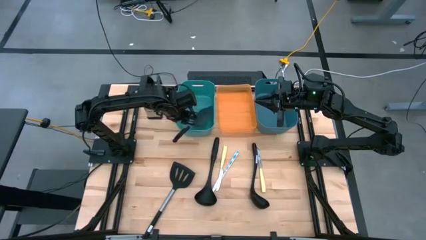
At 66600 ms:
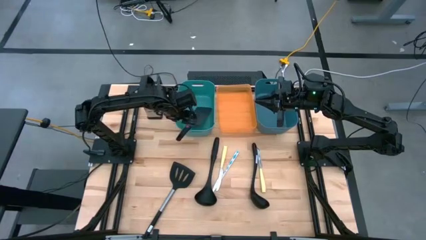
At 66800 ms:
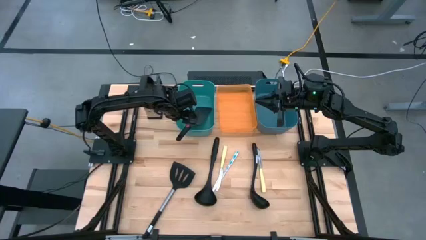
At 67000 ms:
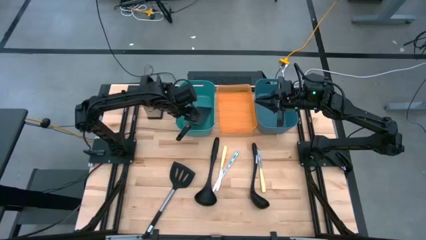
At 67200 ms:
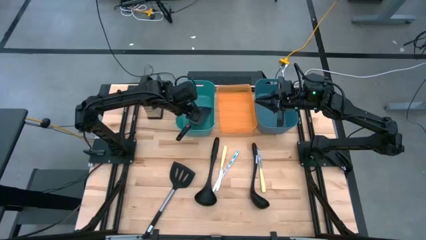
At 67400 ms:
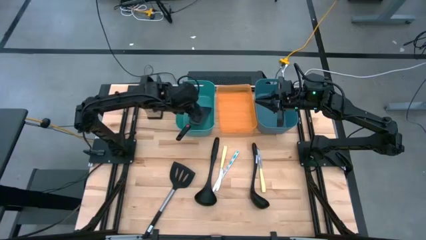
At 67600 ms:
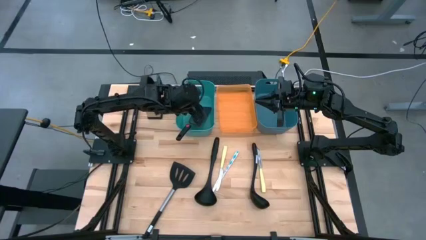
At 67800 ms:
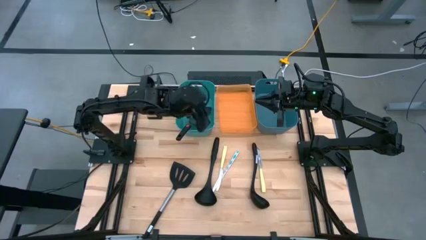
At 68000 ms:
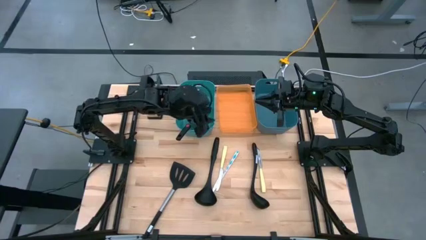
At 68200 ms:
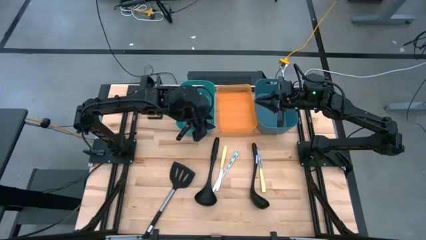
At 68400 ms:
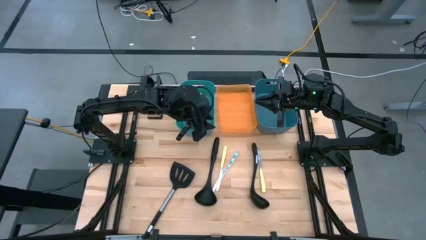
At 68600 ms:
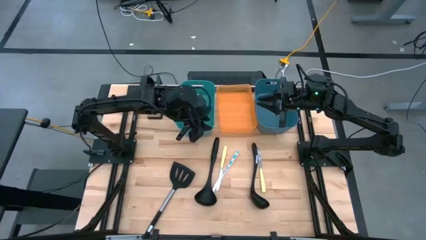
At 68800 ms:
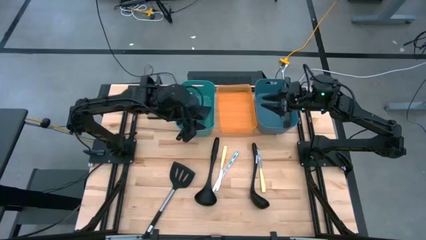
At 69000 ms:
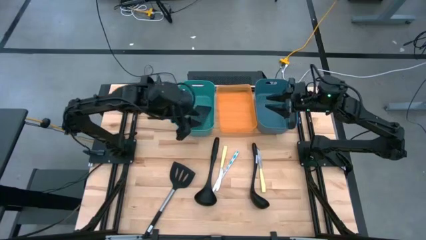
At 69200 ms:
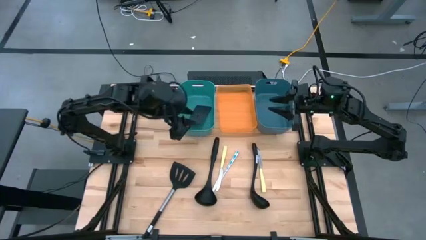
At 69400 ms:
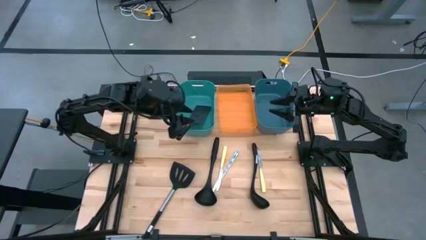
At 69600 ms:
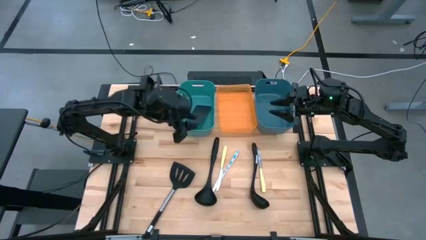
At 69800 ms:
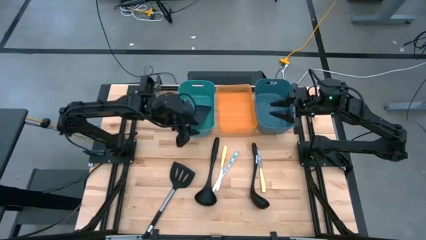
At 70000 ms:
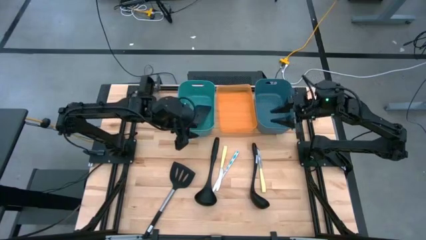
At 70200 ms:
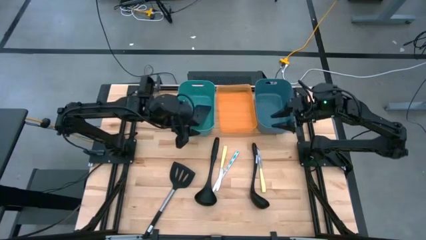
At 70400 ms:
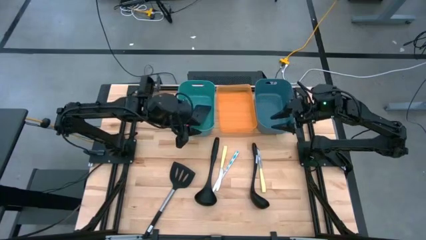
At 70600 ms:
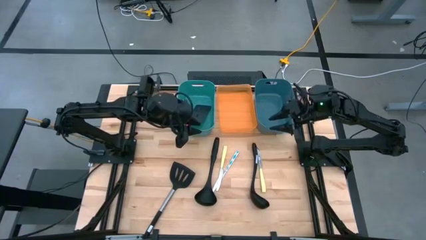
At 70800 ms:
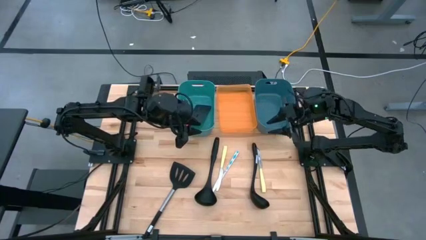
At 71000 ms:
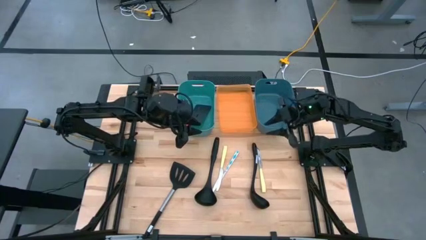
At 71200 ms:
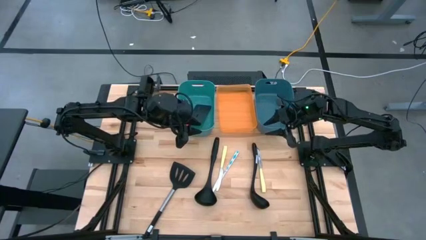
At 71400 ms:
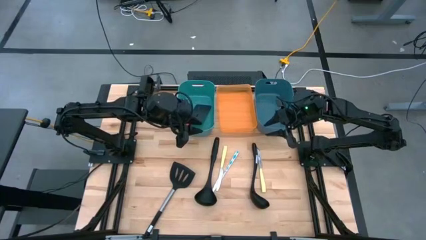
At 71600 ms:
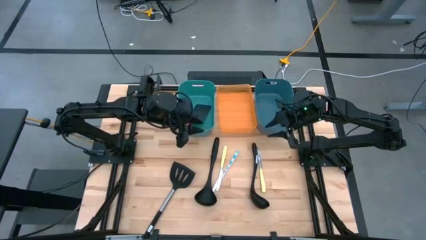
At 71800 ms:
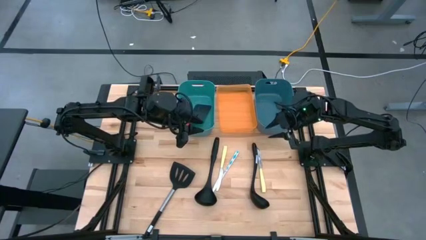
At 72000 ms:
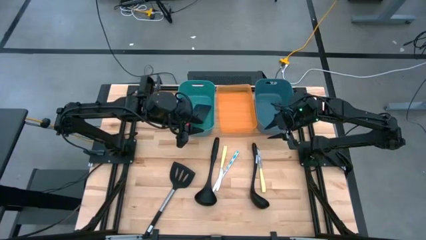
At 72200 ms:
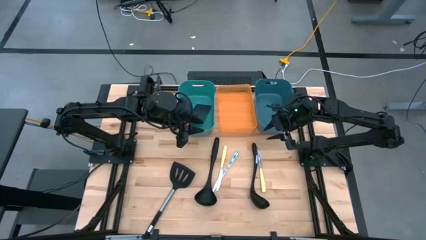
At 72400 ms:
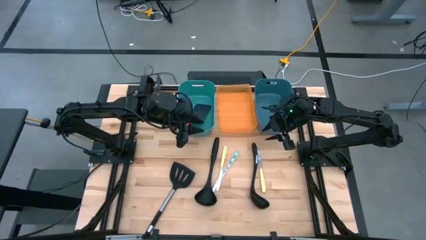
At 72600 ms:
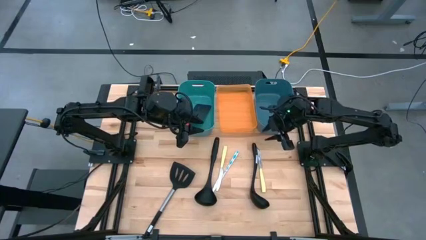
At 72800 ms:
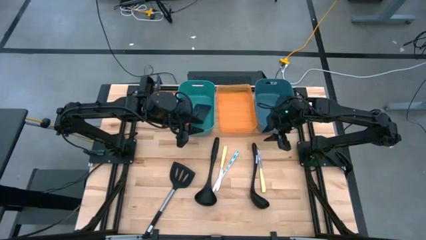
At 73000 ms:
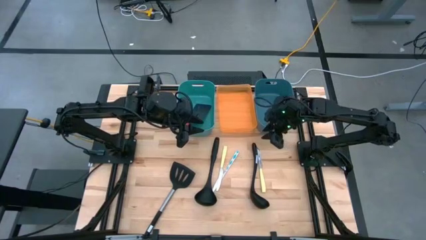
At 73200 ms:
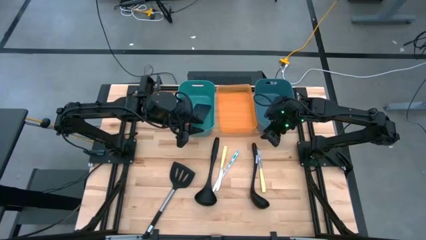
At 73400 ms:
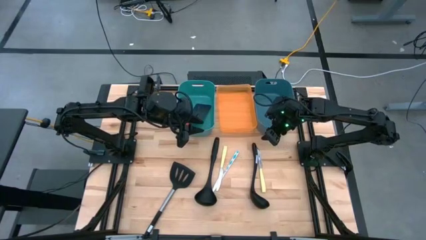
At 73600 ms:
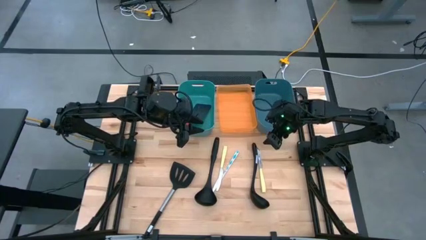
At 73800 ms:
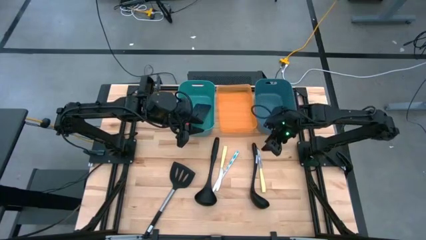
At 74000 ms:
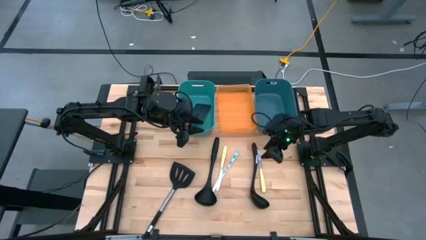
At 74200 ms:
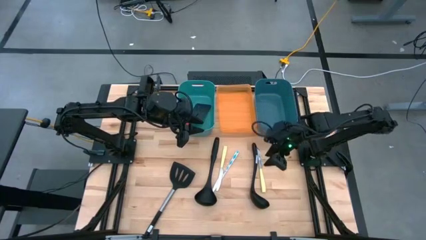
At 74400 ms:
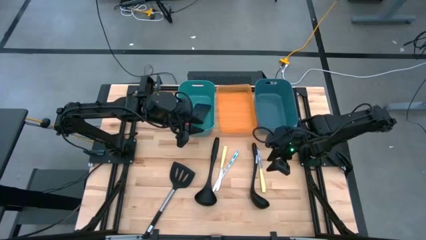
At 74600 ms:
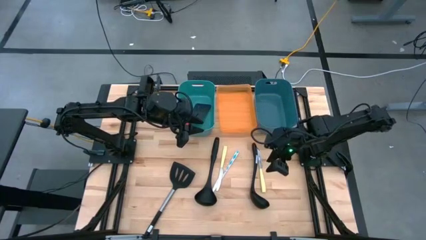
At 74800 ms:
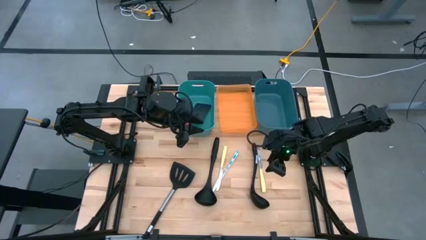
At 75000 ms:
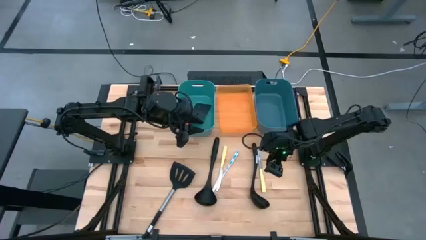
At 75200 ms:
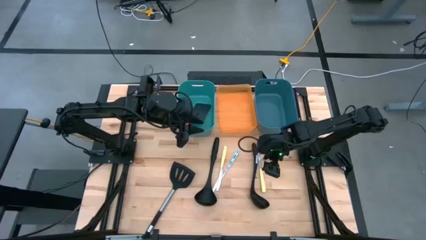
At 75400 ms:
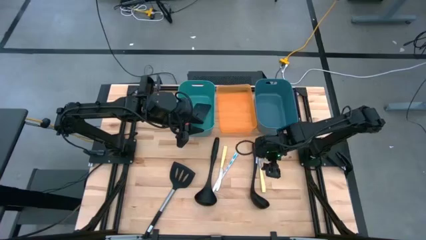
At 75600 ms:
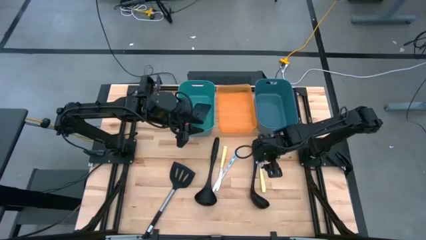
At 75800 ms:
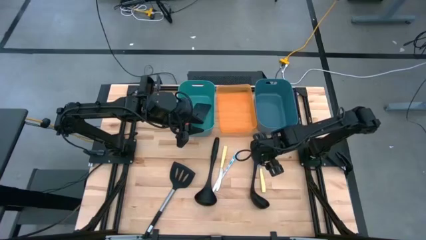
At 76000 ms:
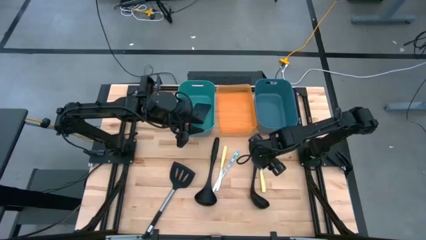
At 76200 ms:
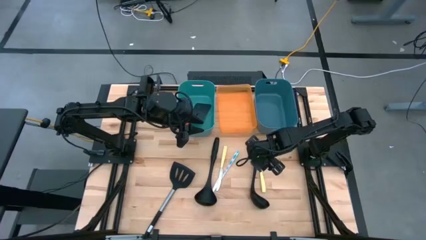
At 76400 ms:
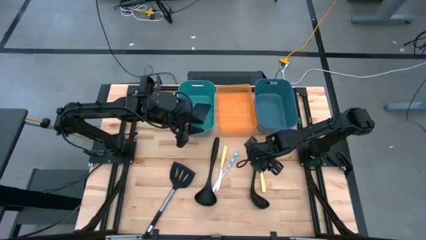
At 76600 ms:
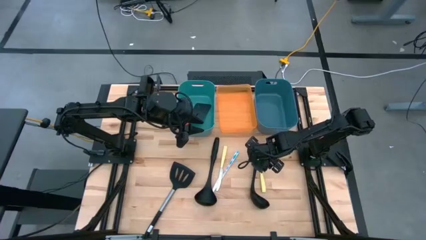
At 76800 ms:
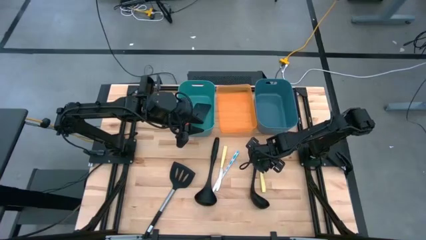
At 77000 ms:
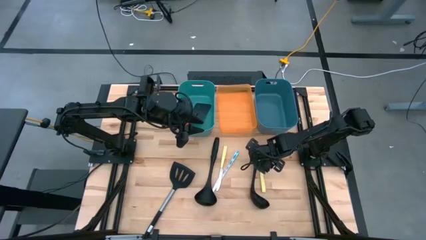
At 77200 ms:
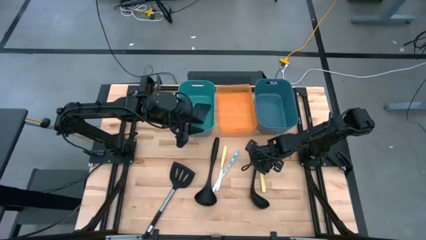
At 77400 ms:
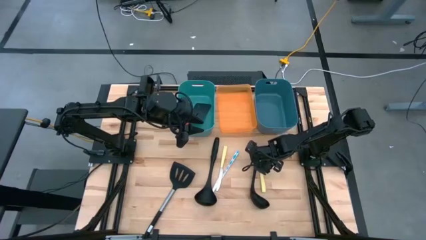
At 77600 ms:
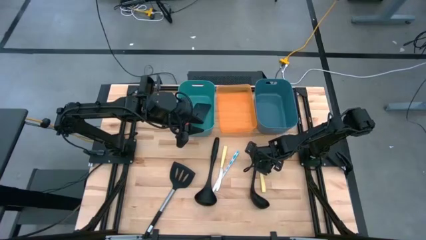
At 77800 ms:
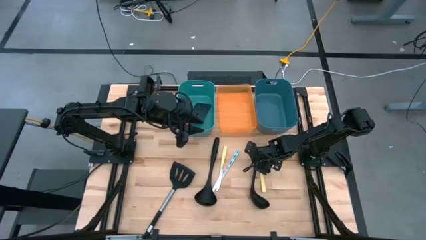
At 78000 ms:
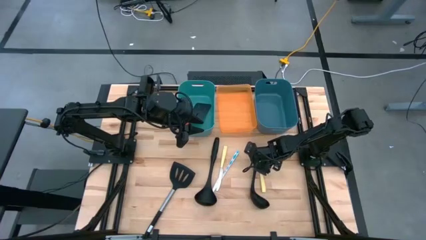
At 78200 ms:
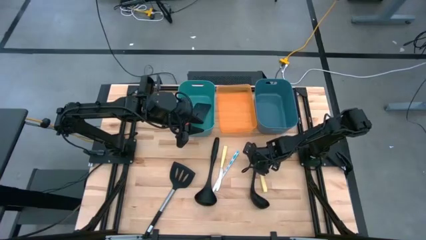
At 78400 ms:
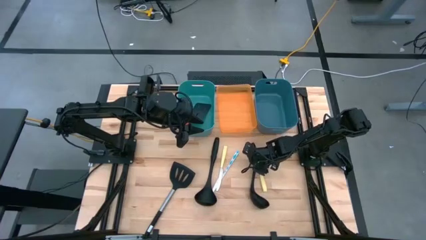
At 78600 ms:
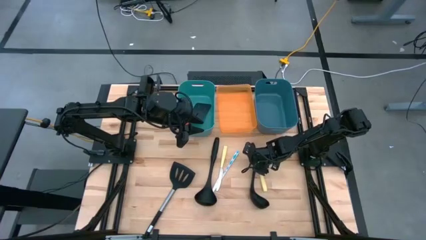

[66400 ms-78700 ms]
Task: Pick & Place Kitchen Items
Put the right black ladle into the blue bin
